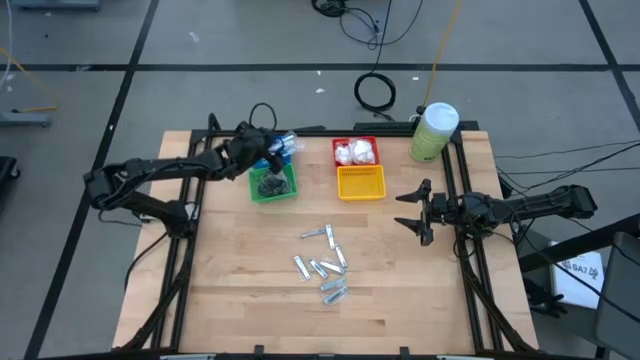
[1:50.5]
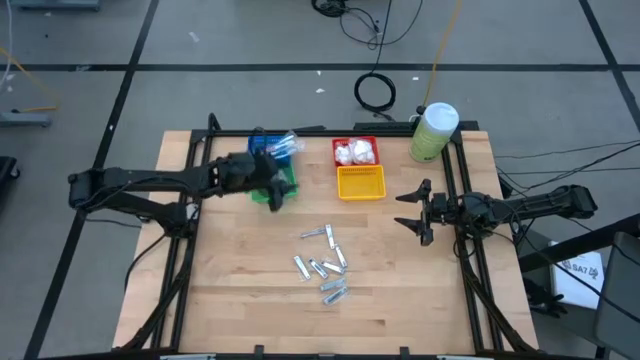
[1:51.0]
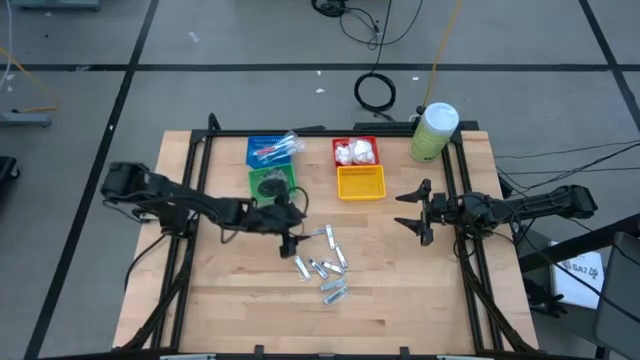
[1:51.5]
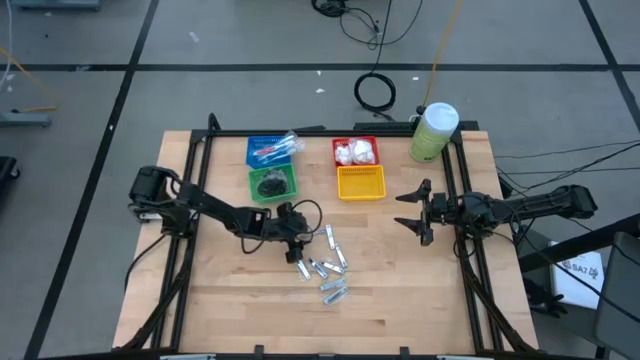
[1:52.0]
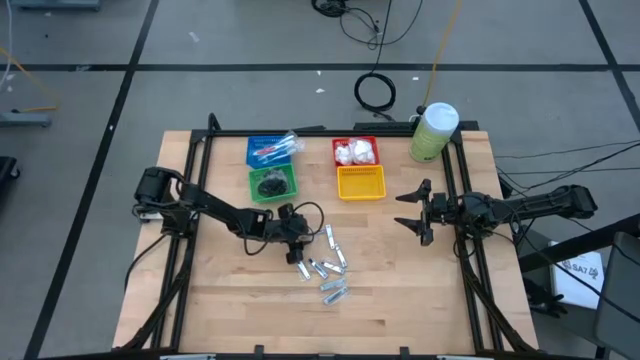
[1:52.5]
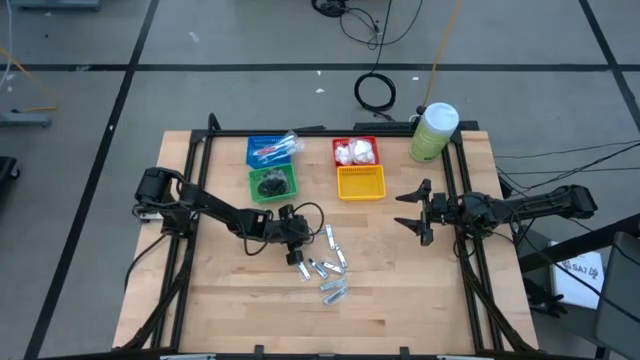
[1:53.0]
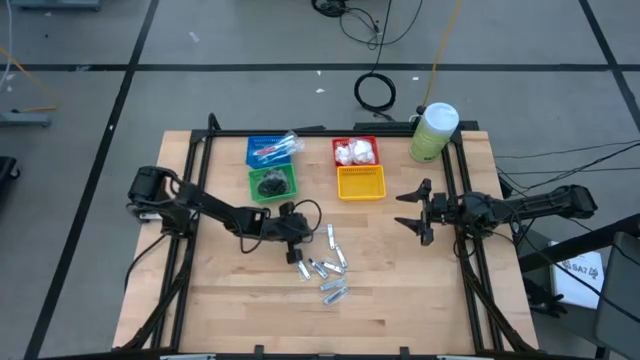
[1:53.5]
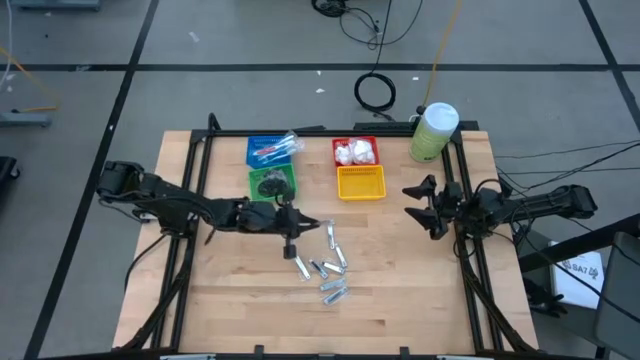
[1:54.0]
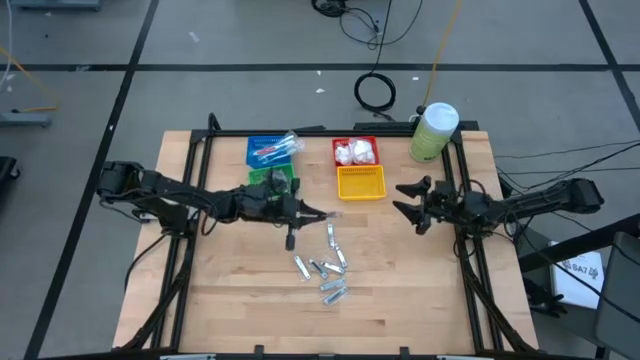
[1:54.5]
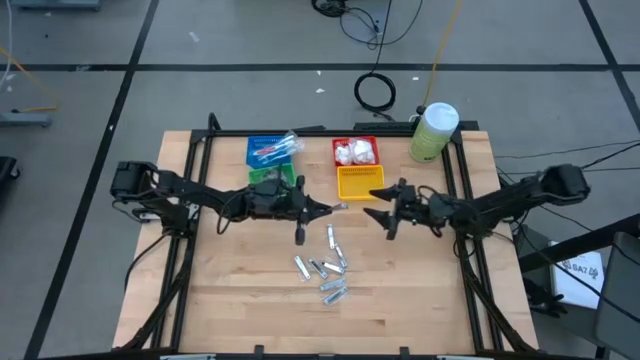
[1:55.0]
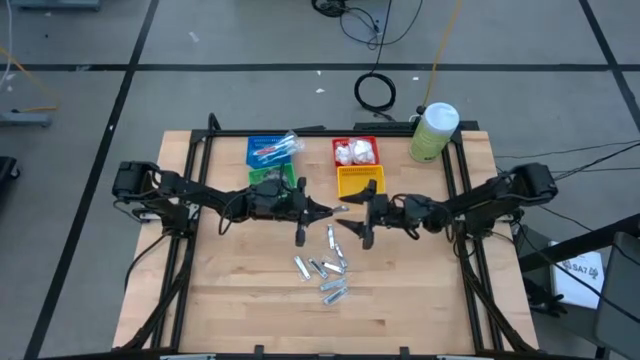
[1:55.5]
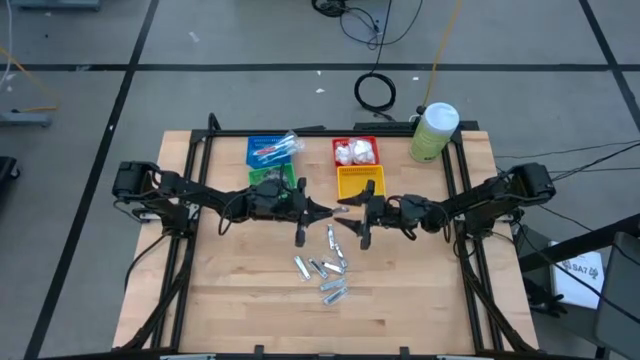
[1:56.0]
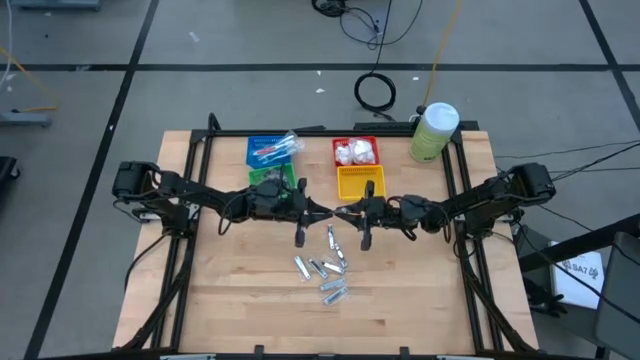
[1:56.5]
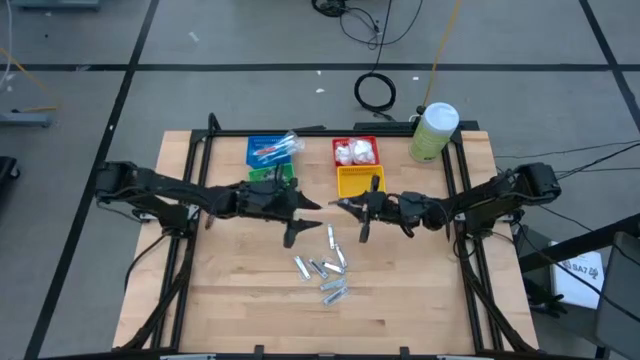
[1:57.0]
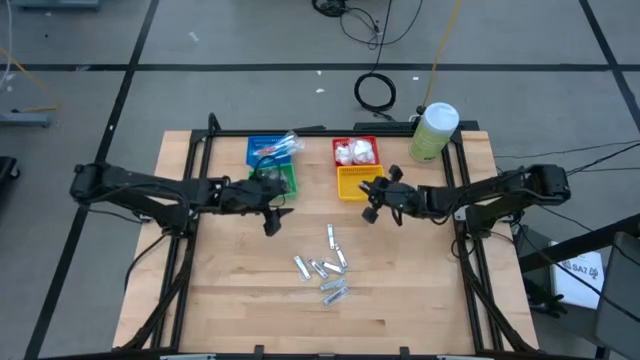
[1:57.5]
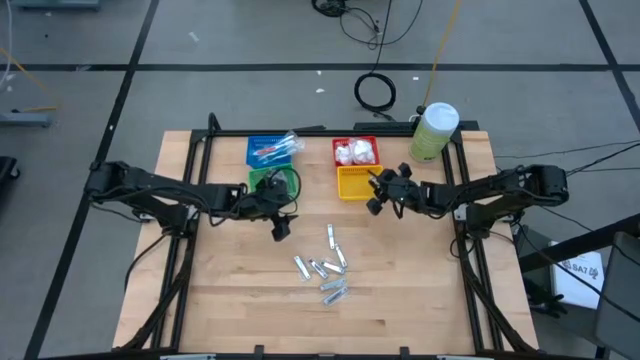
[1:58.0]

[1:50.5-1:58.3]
Task: Pick & Place Travel size toiletries
Put the nail cutter into the yellow bin

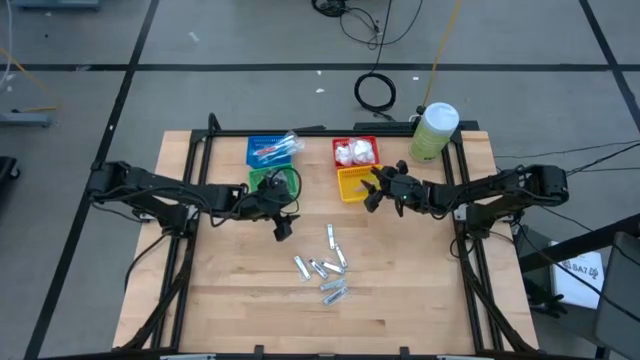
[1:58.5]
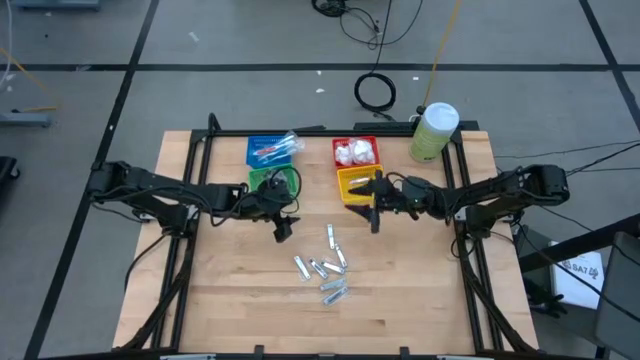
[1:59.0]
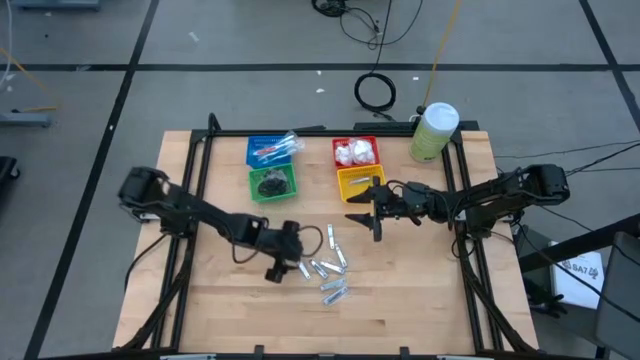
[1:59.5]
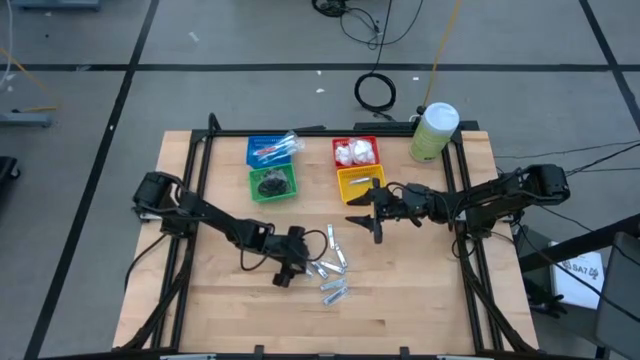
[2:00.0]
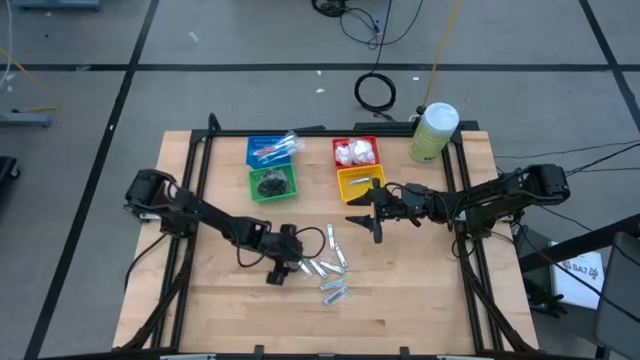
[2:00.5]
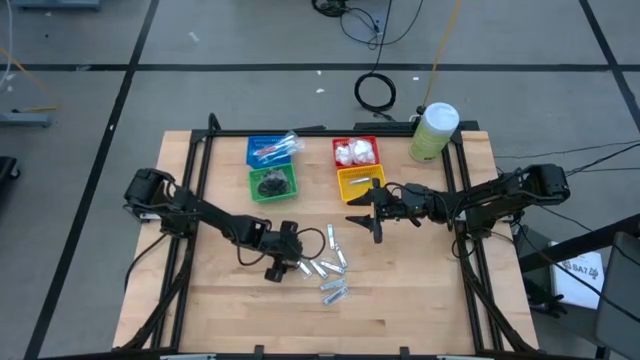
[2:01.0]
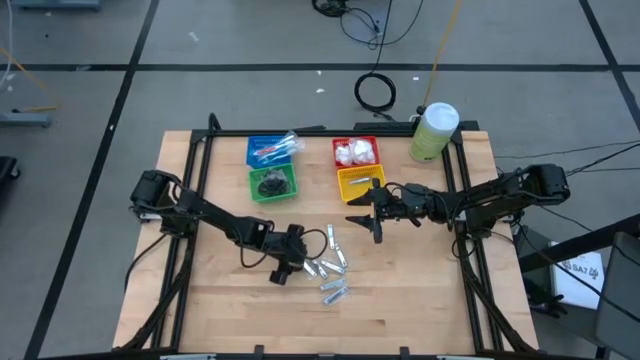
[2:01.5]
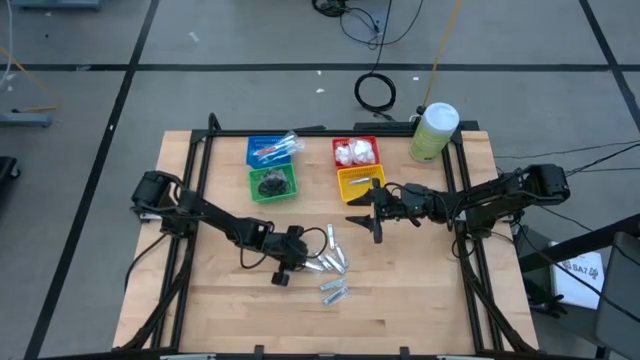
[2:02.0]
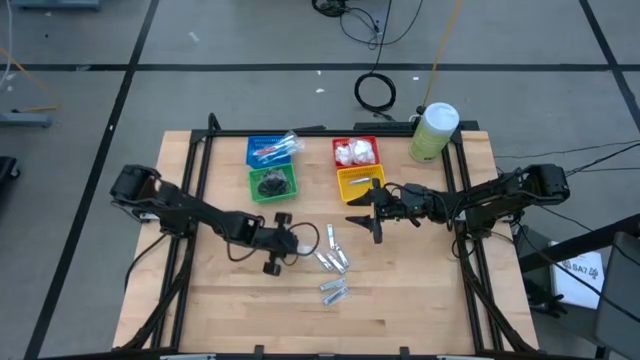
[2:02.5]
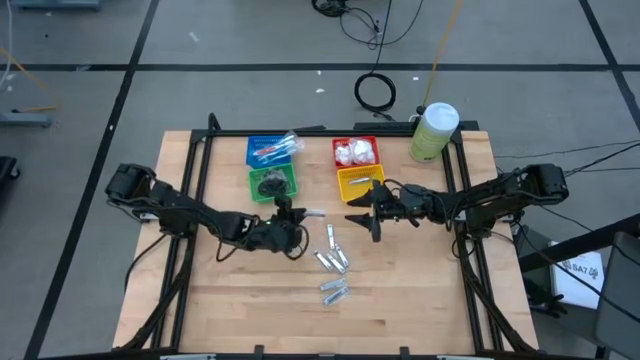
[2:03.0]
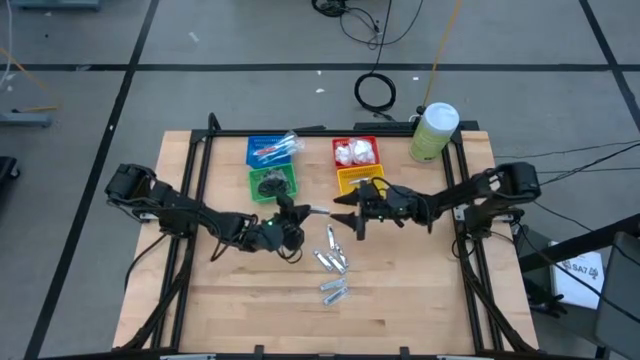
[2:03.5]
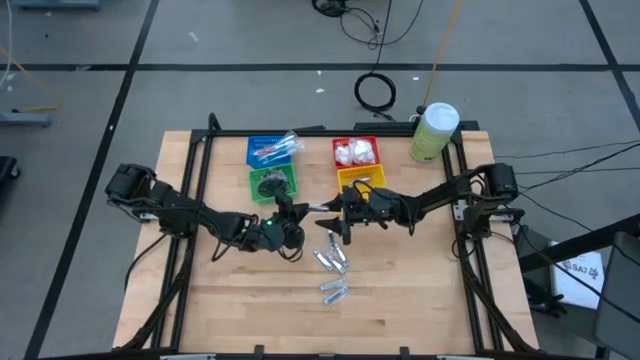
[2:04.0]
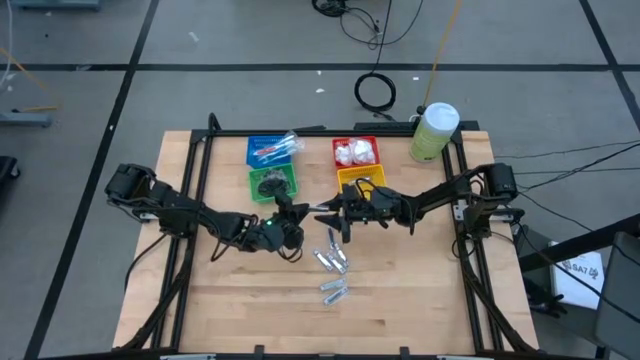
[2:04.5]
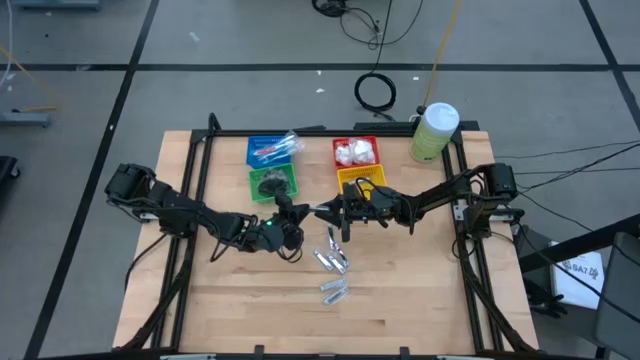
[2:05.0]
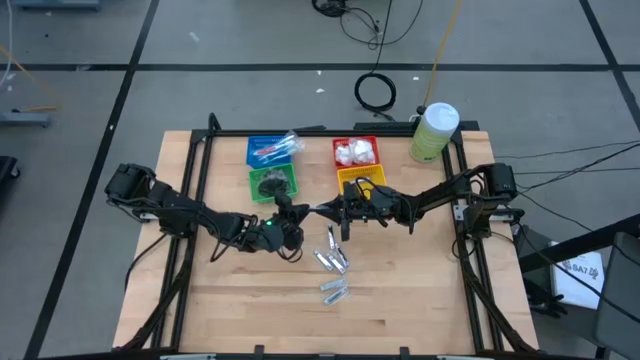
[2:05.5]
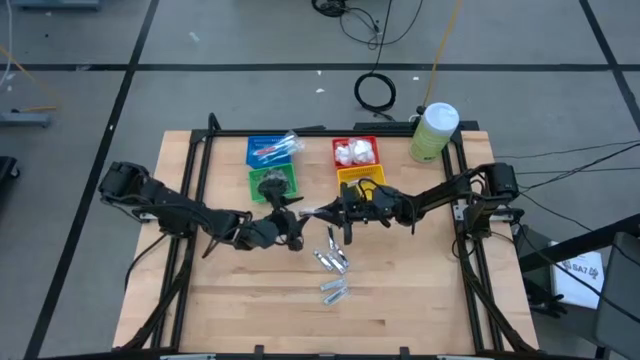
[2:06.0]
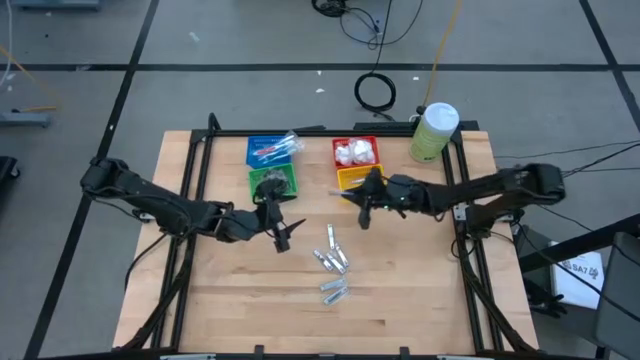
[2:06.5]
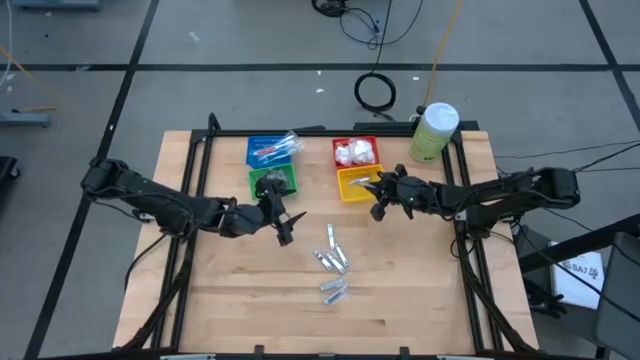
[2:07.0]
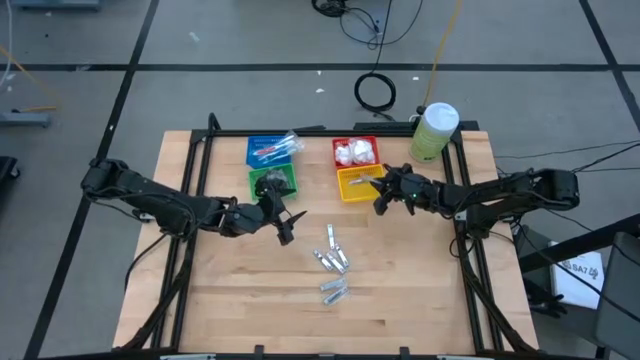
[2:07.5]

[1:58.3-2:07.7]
Put the nail cutter into the yellow bin

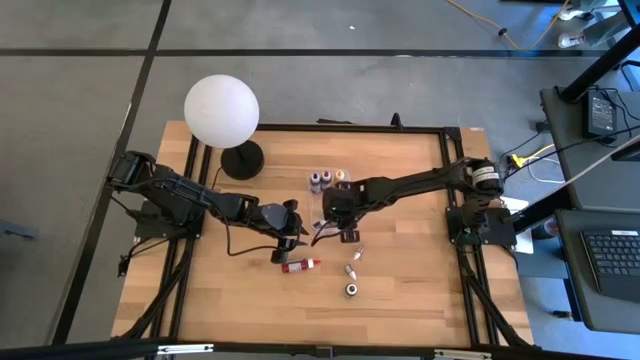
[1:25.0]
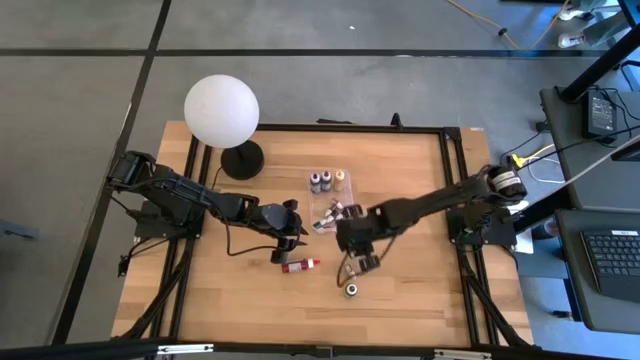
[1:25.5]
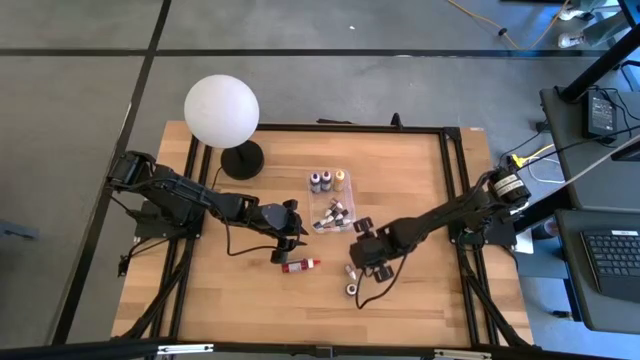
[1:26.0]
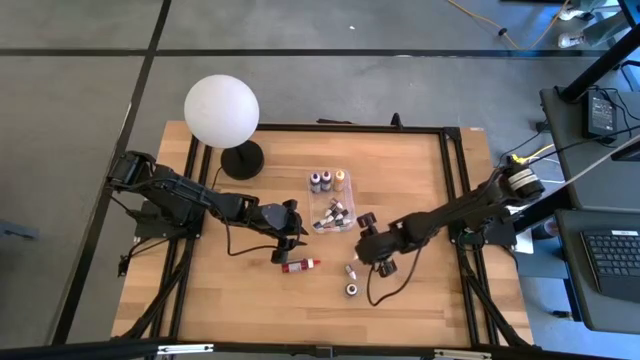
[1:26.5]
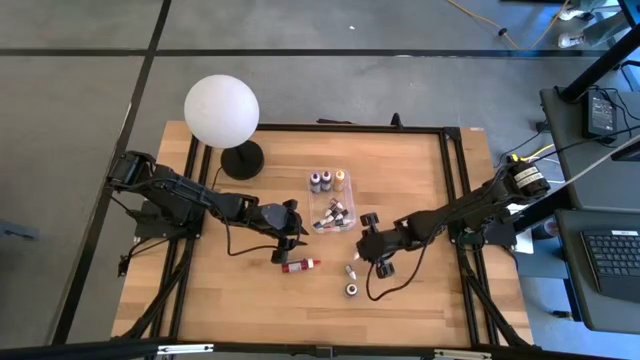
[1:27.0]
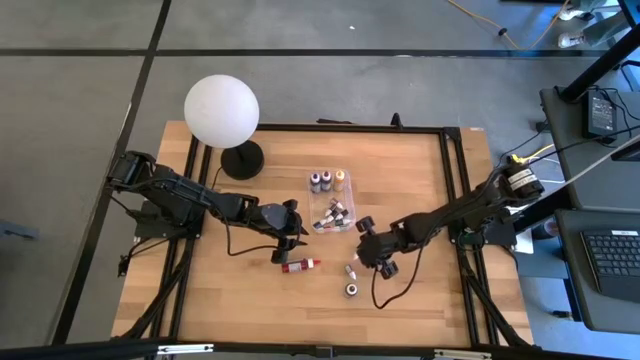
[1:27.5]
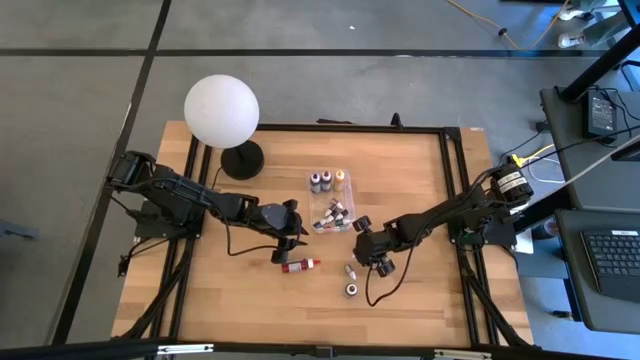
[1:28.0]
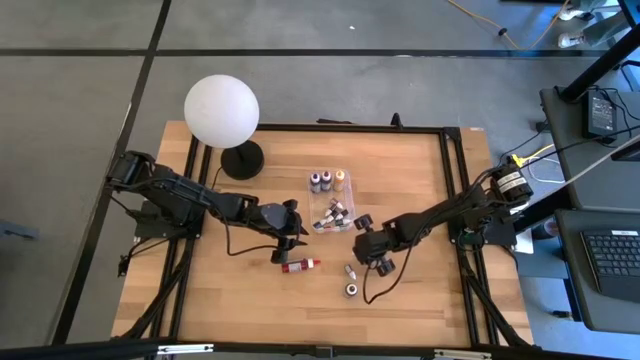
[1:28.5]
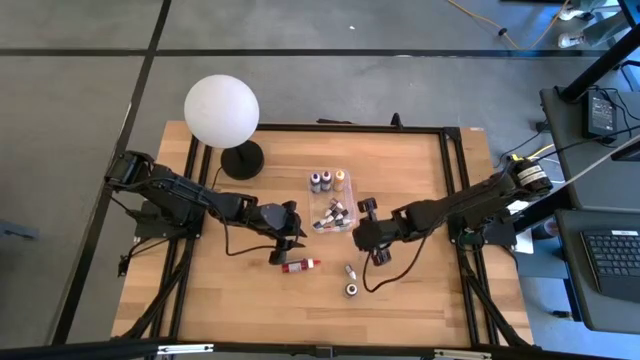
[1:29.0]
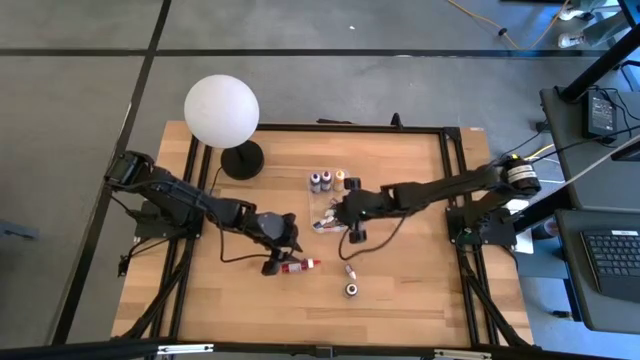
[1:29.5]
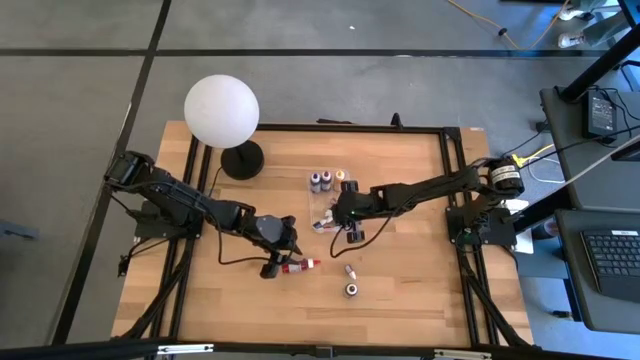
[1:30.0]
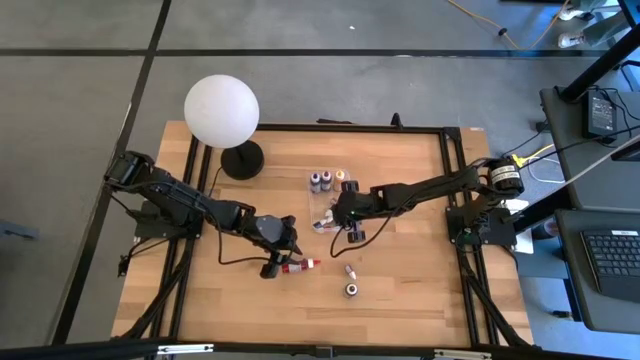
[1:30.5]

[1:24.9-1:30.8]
Task: Pick & Place food coloring
Put the small red food coloring bottle in the transparent bin
